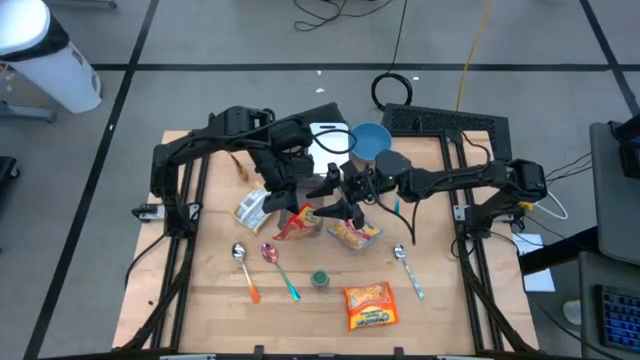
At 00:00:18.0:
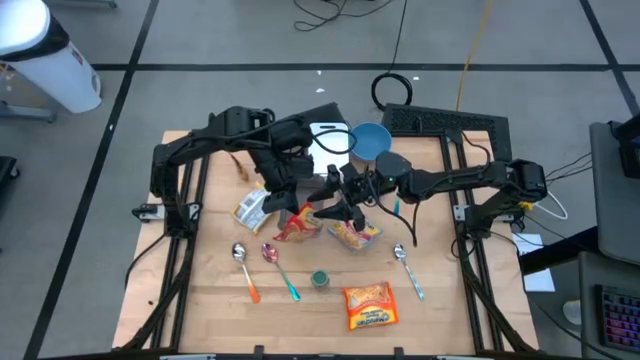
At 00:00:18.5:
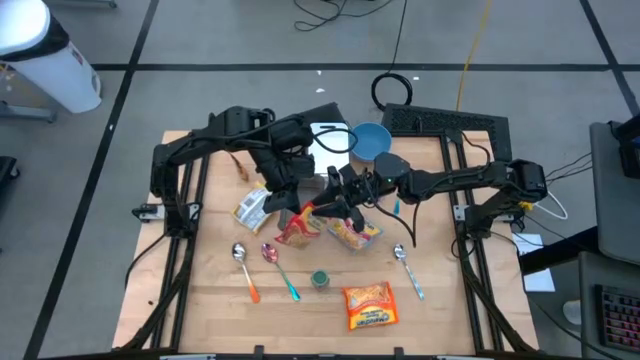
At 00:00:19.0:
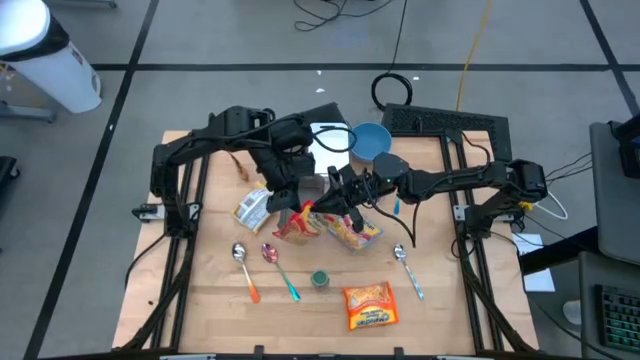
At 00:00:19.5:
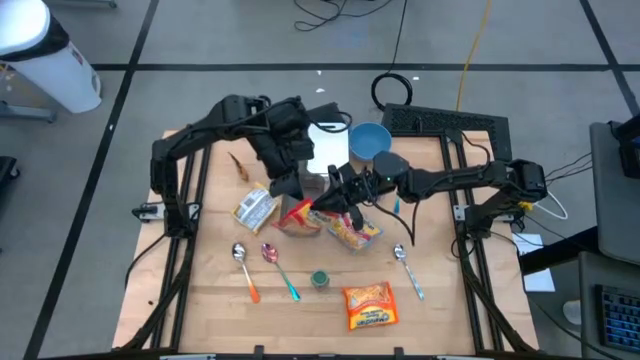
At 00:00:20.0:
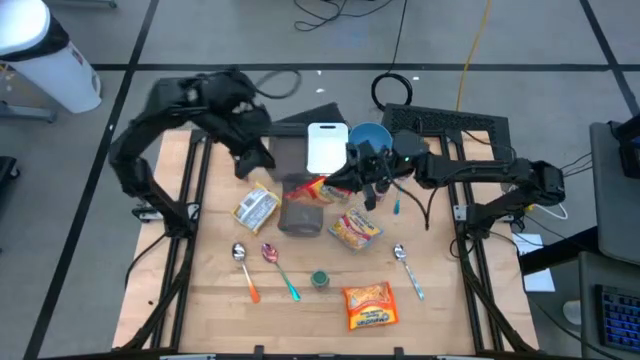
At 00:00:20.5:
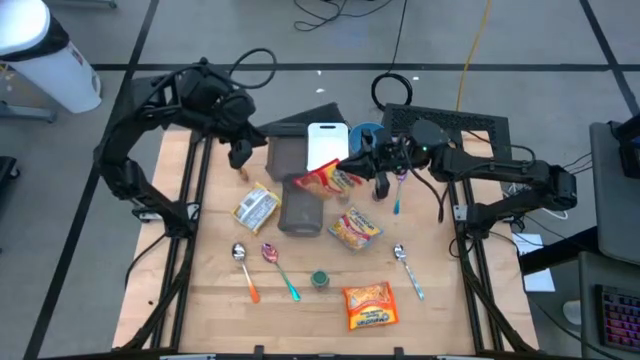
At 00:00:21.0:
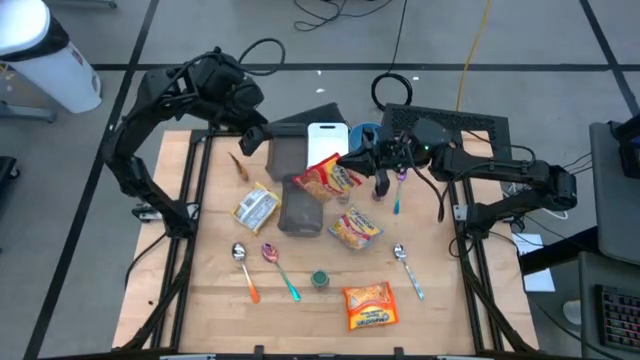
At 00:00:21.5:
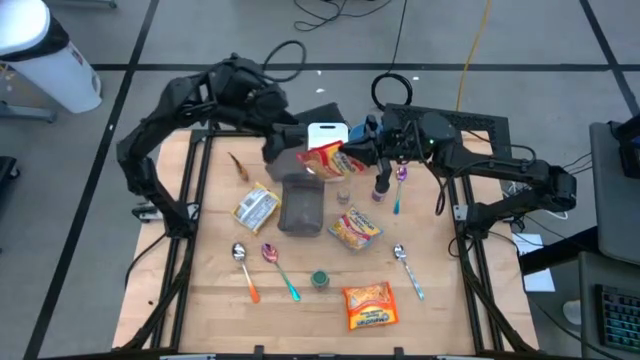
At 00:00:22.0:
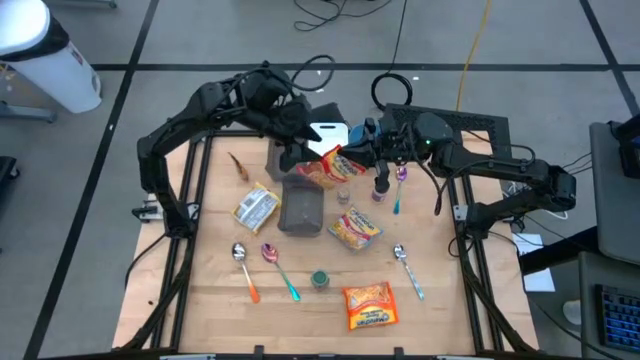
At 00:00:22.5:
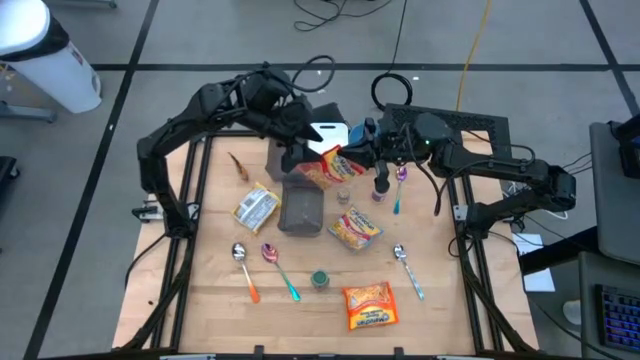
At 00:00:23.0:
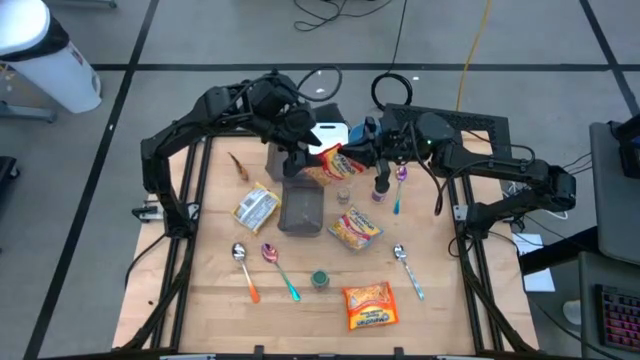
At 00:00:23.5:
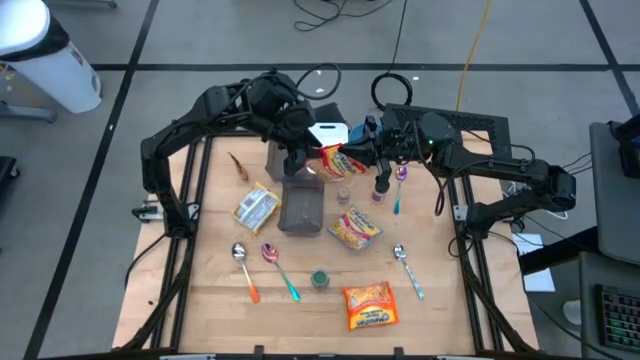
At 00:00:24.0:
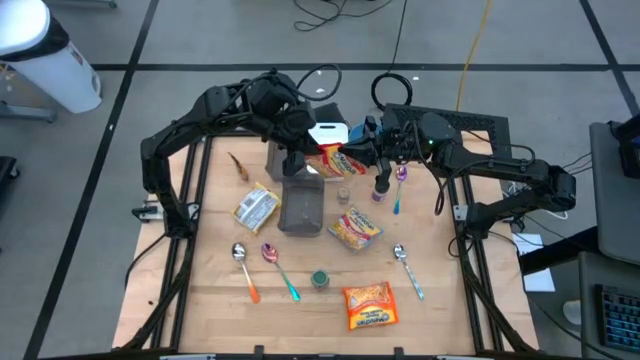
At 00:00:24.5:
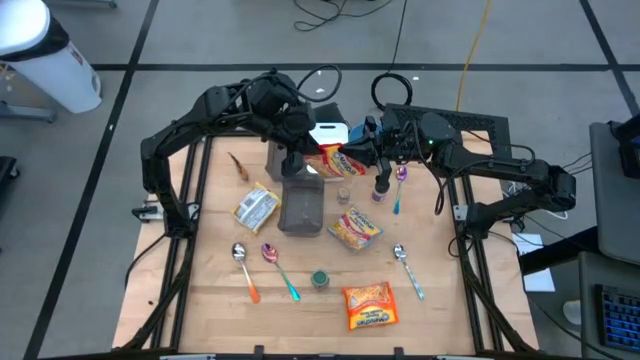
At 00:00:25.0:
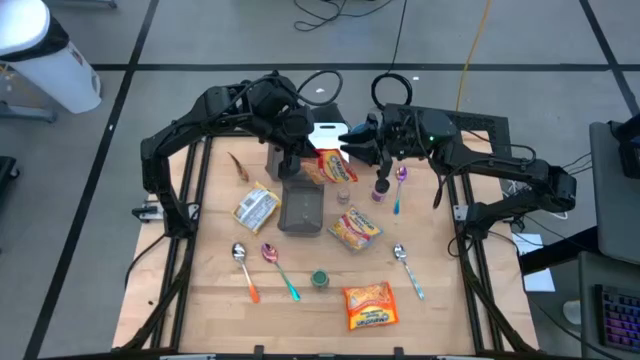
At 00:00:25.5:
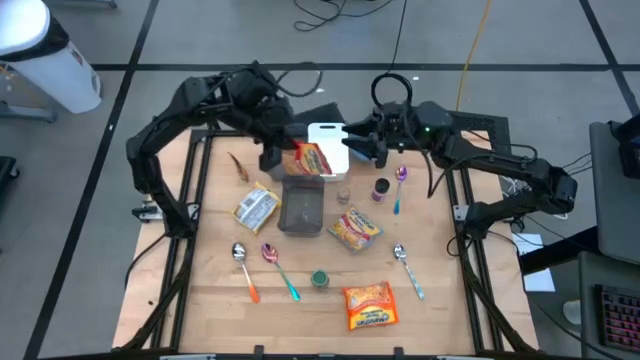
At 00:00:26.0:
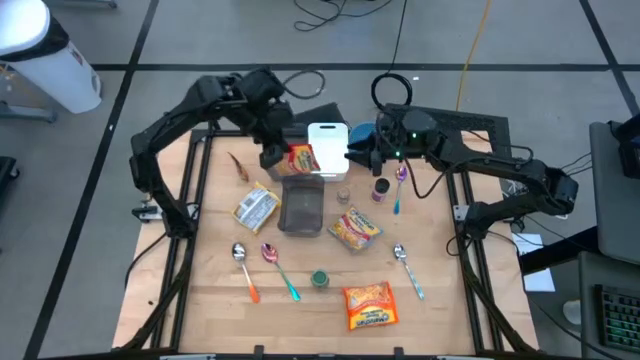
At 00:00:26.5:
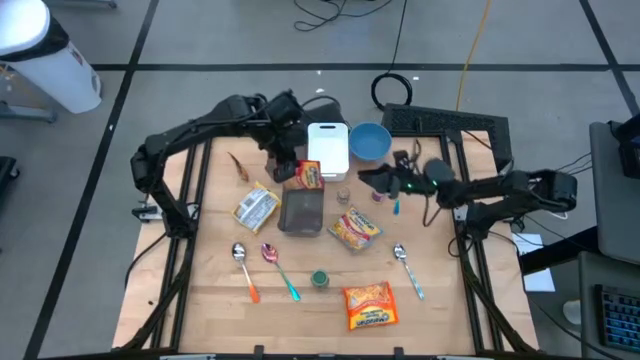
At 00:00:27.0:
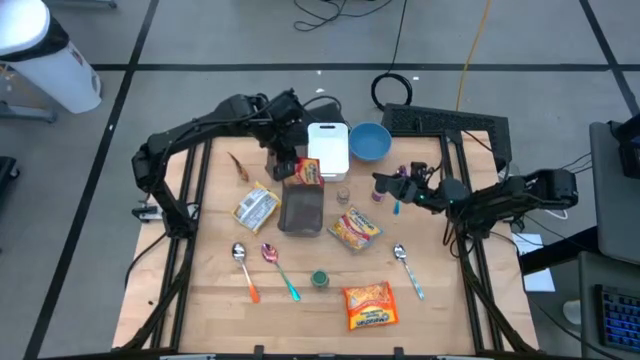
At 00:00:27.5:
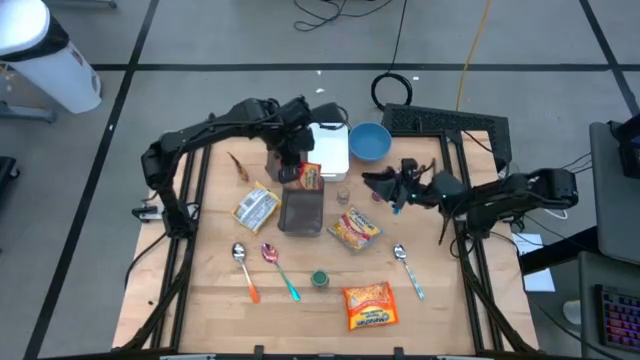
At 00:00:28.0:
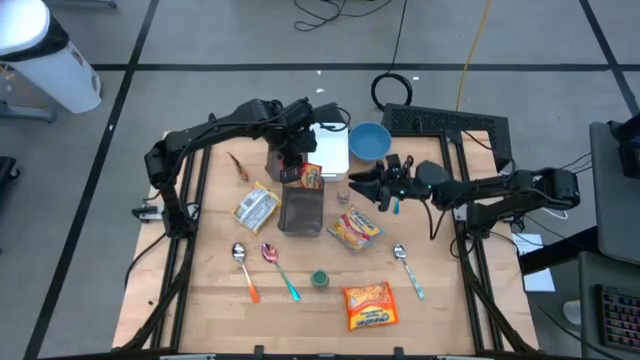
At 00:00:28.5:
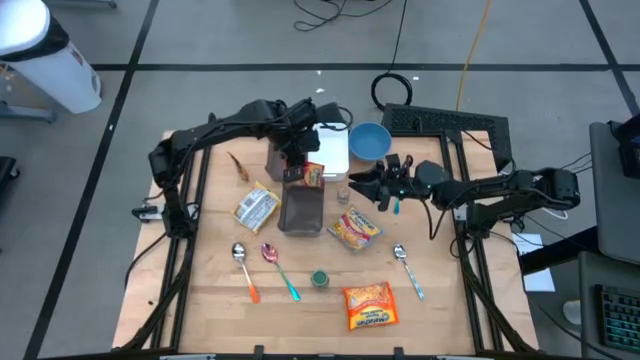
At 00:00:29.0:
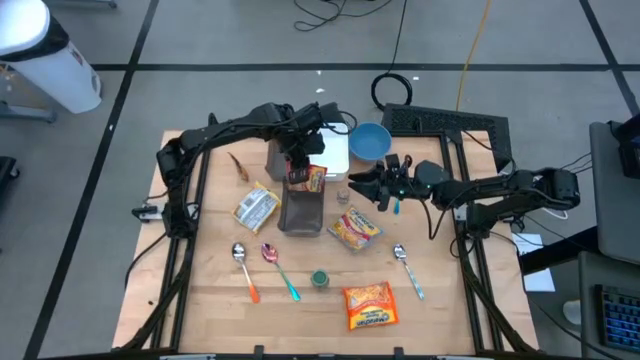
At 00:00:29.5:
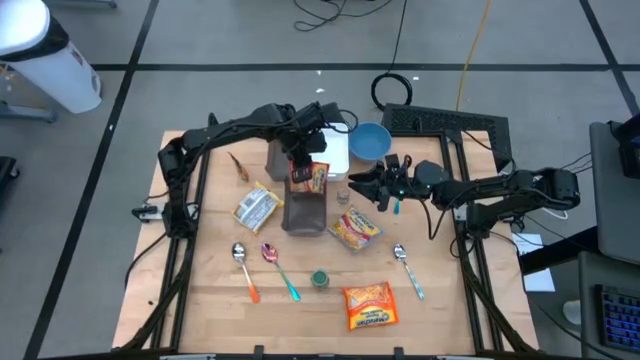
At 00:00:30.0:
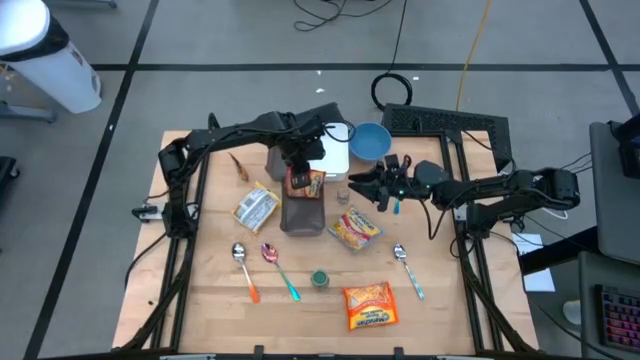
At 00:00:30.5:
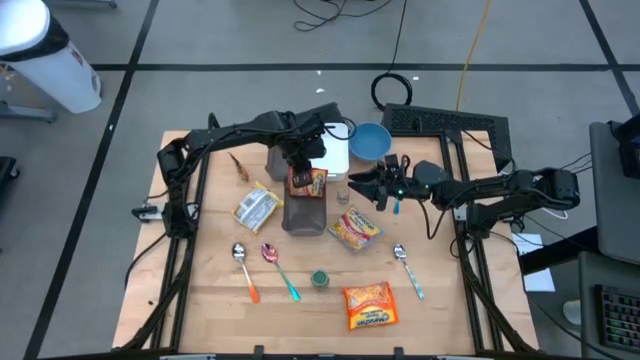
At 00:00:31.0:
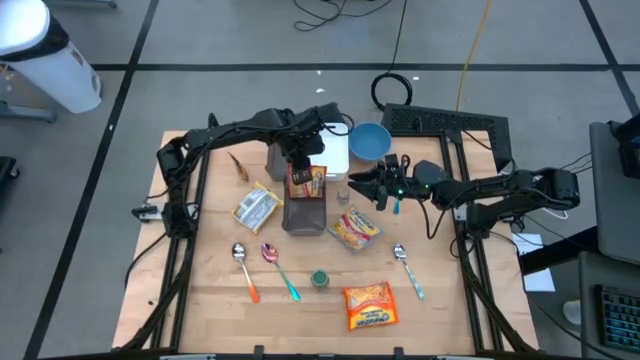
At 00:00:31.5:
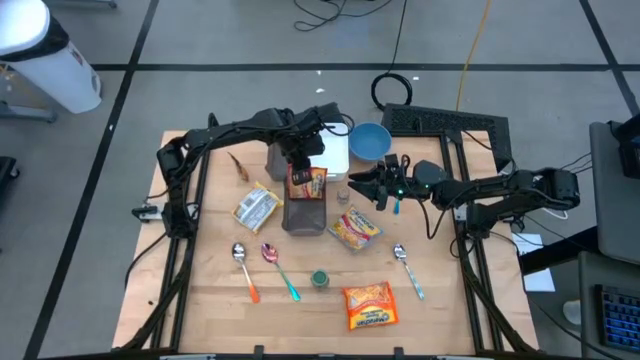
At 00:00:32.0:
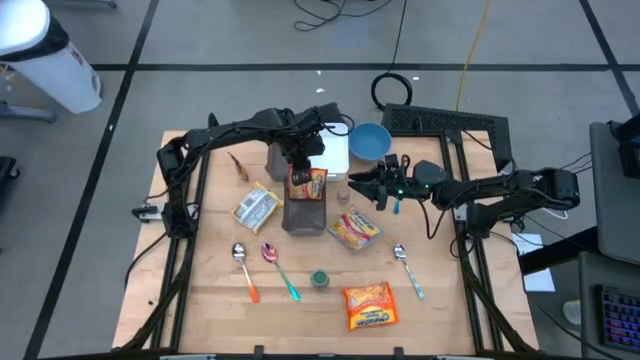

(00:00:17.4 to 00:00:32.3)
Task: Pick & Place Food Item
Put the red noodle pack into the bottom black bin
